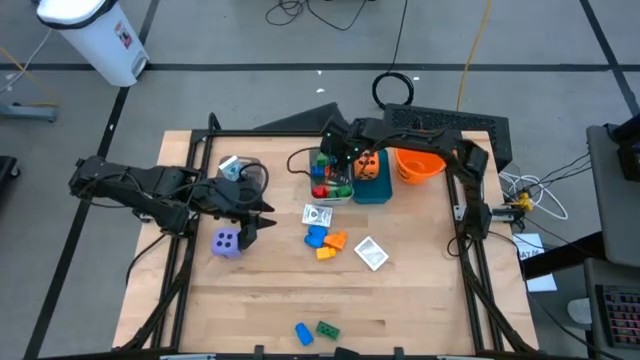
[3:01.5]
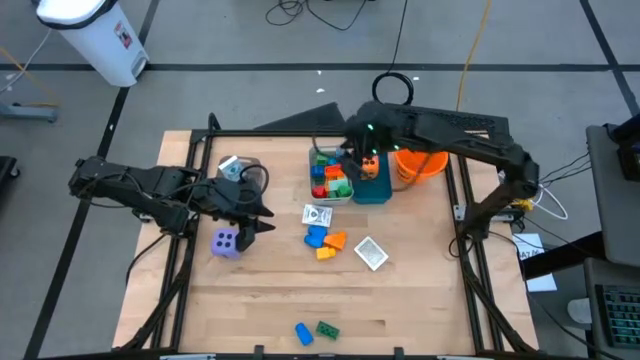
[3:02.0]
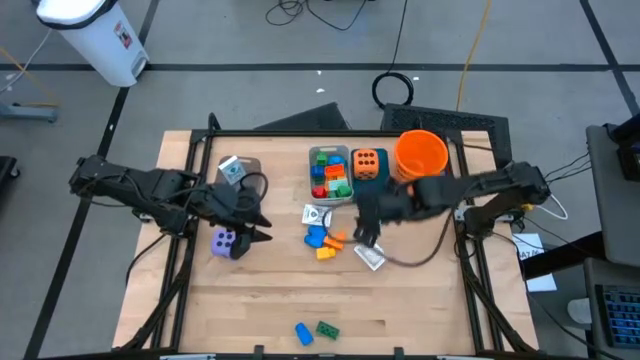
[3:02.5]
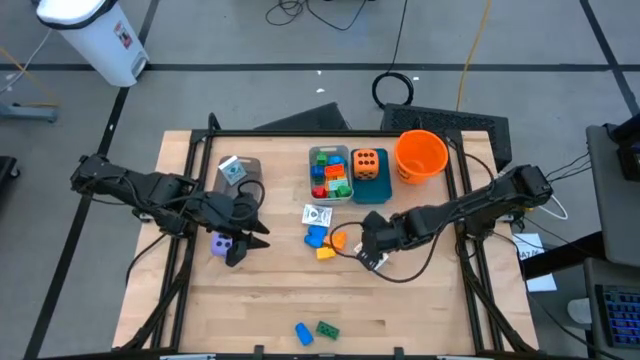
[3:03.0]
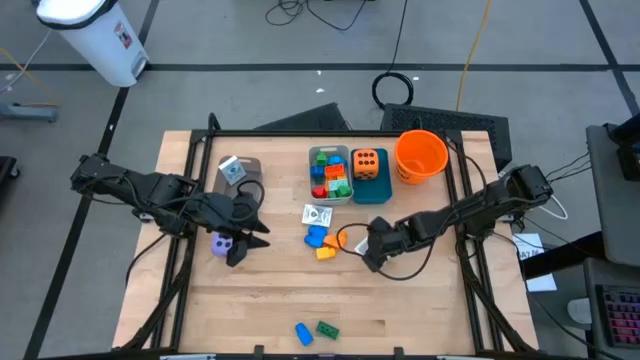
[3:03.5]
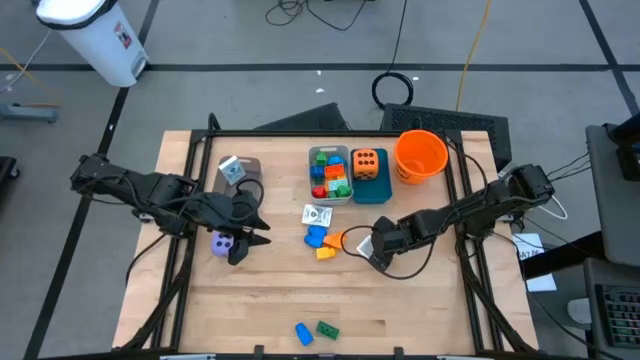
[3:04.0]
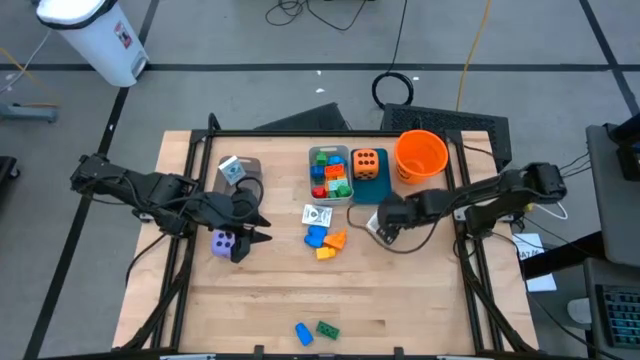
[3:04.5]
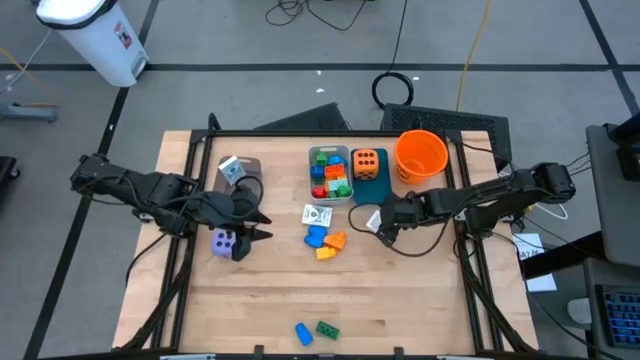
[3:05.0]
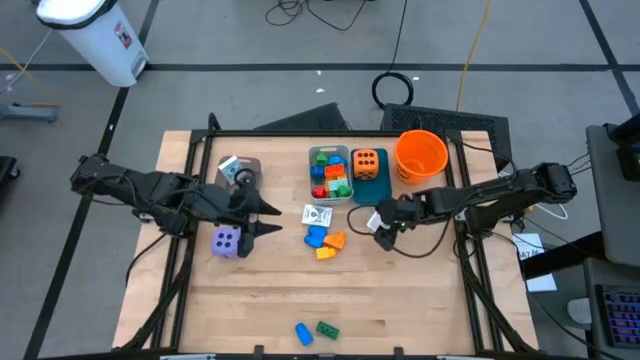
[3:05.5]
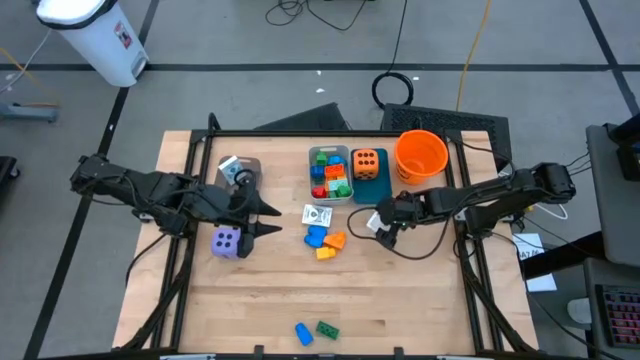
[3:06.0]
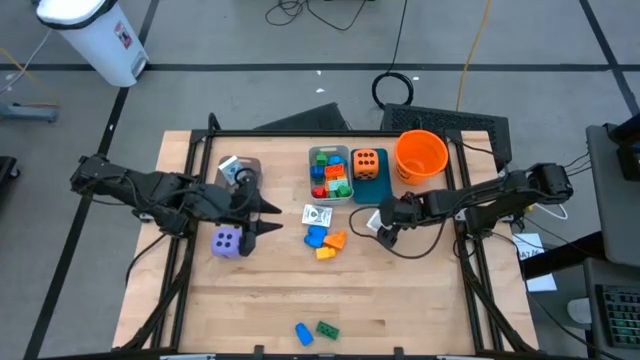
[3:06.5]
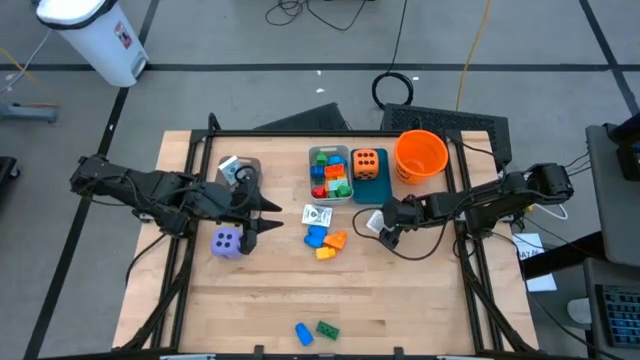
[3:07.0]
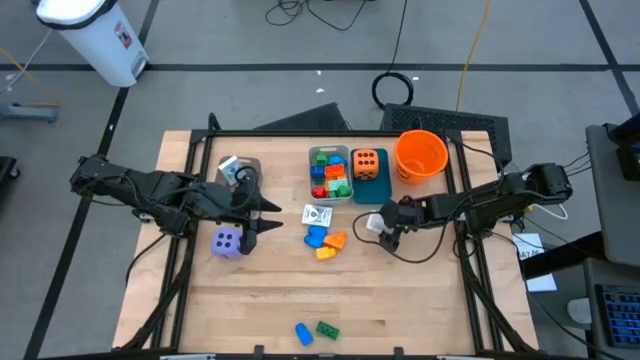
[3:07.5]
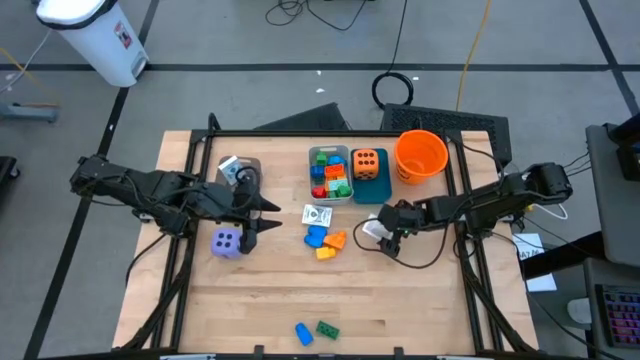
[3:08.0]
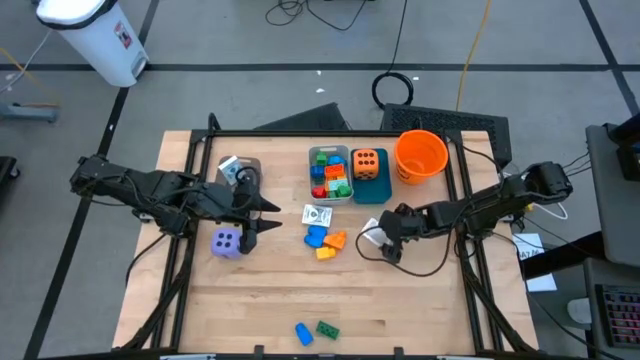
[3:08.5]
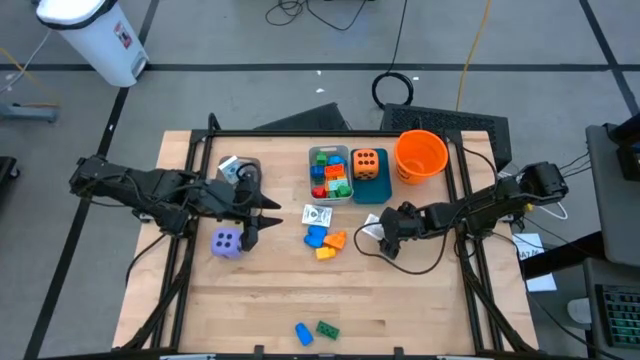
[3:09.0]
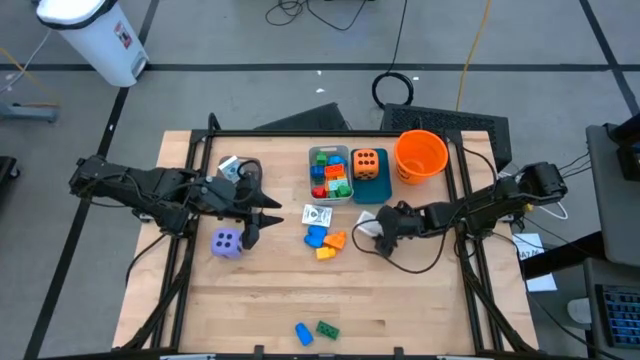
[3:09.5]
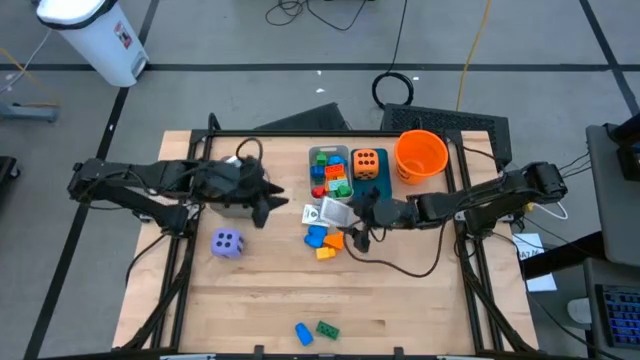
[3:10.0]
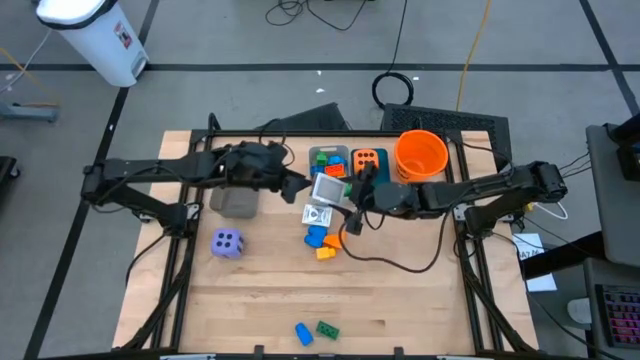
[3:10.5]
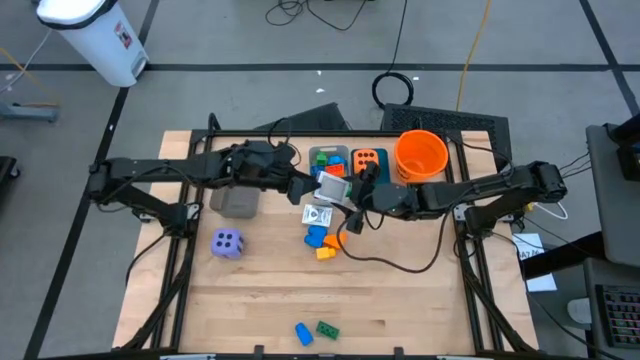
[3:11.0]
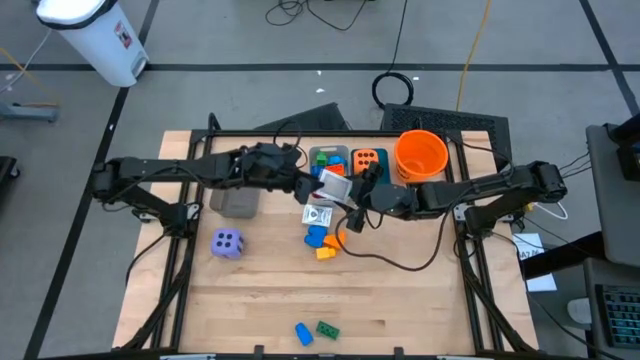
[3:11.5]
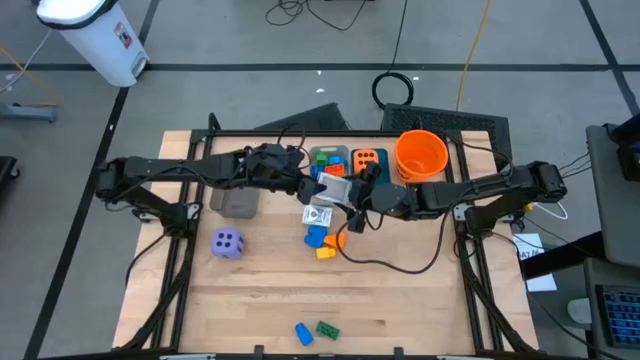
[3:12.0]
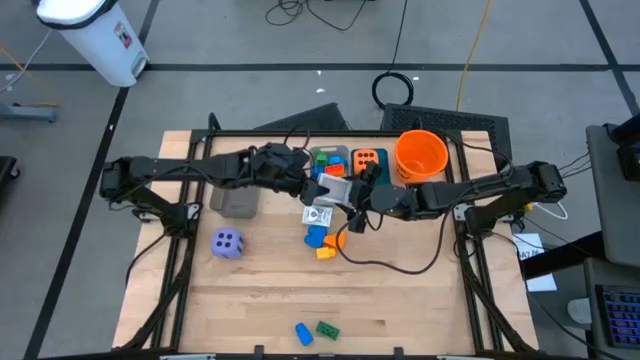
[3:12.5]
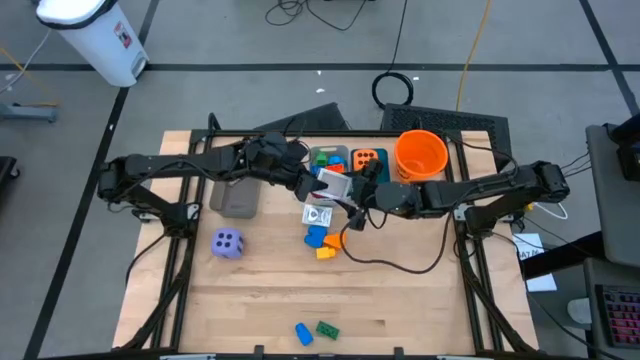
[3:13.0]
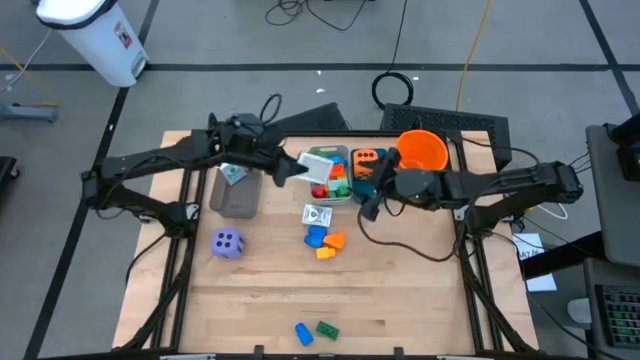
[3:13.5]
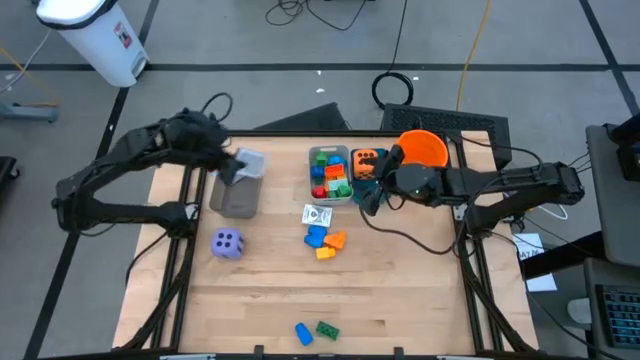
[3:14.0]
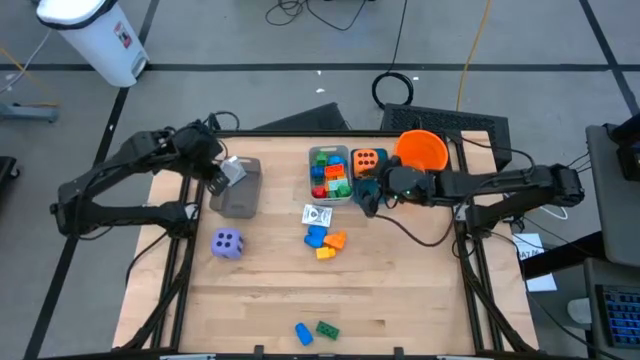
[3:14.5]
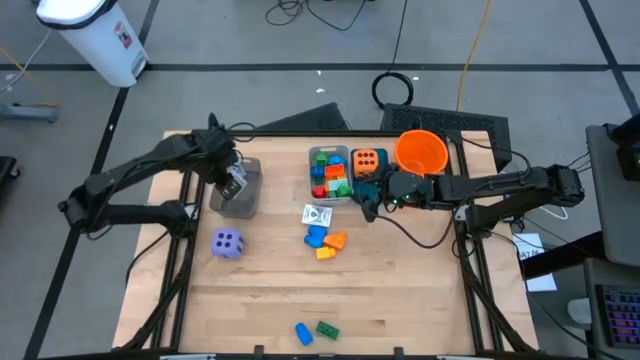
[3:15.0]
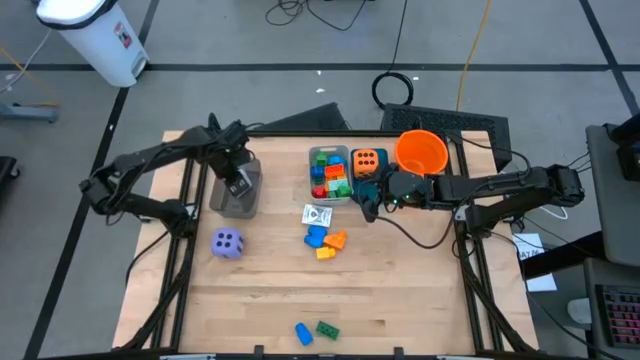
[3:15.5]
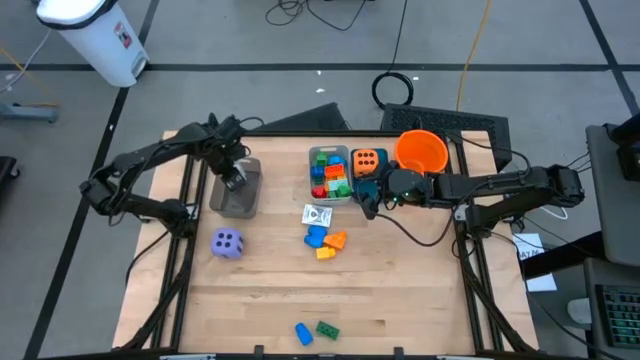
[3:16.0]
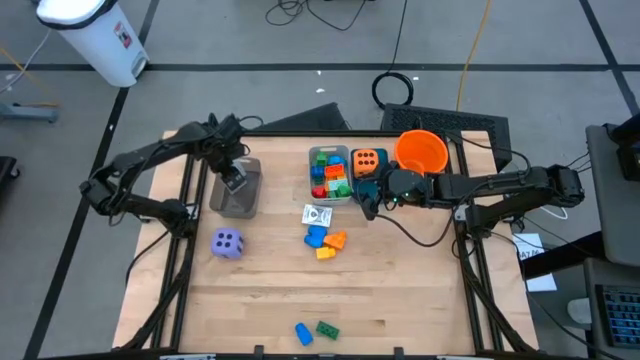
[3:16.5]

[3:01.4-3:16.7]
Task: Pick & Place Toys
Put the brown deck of cards into the black bin

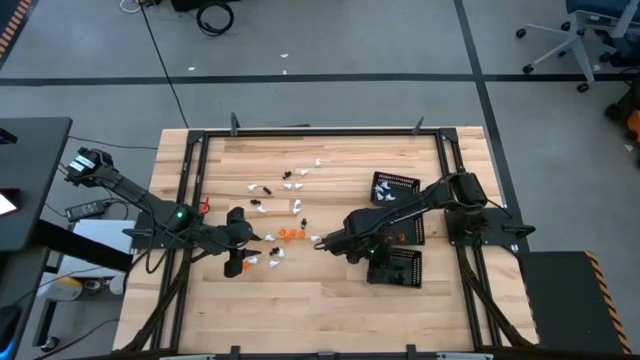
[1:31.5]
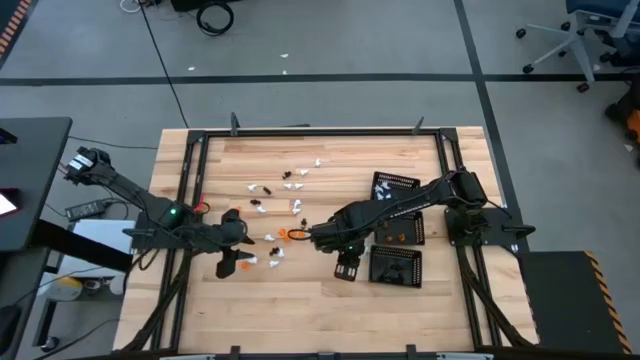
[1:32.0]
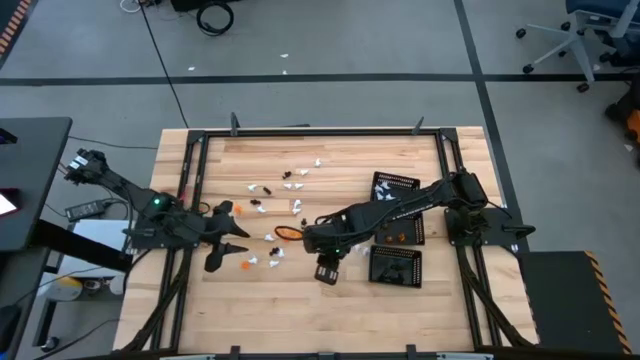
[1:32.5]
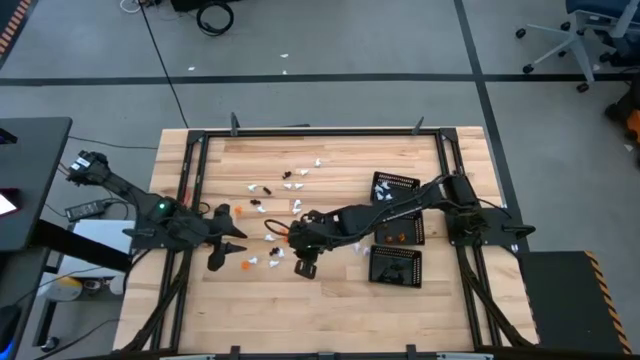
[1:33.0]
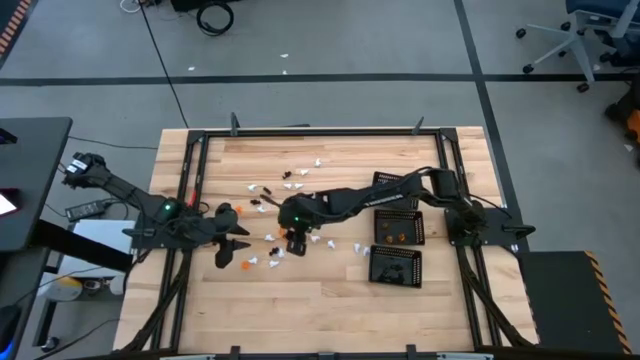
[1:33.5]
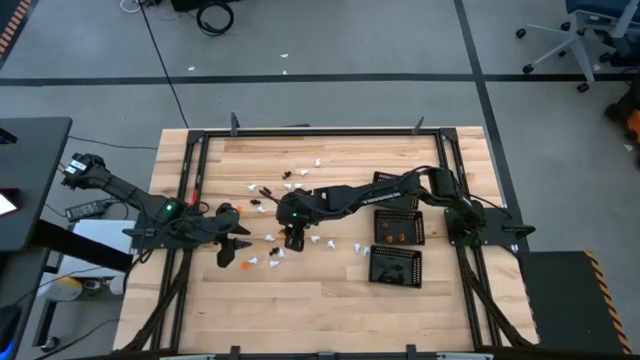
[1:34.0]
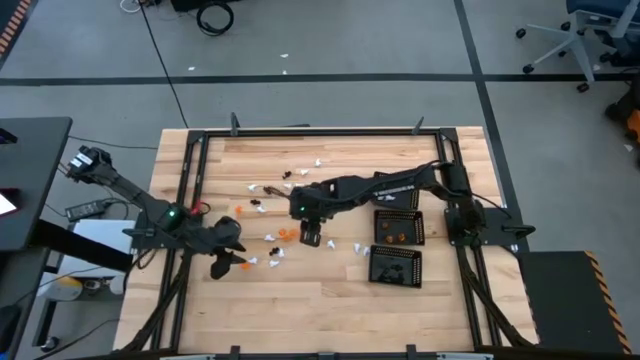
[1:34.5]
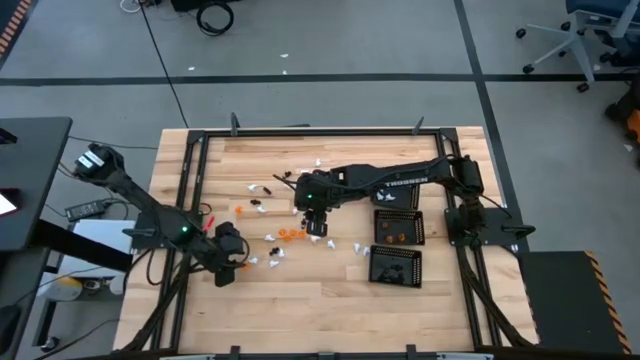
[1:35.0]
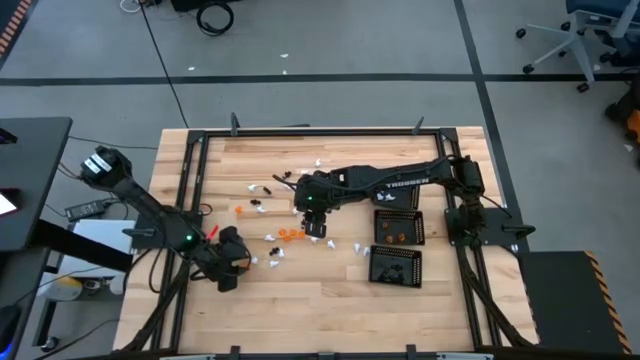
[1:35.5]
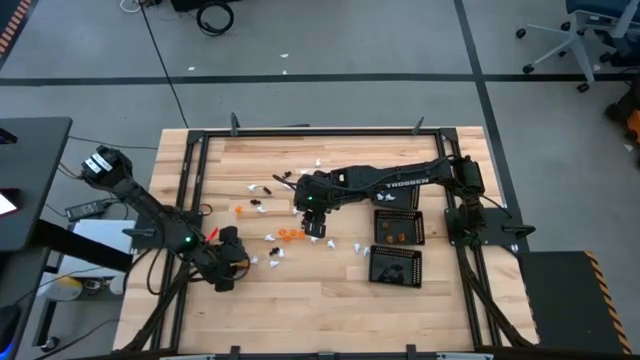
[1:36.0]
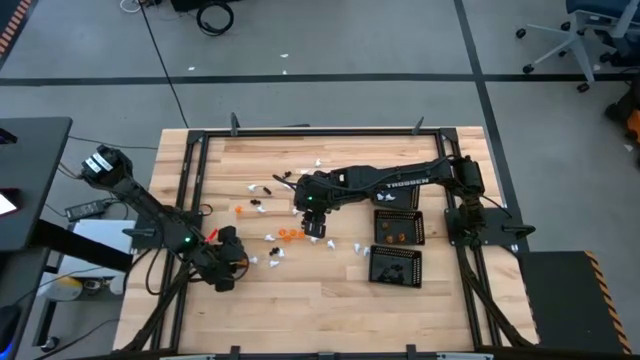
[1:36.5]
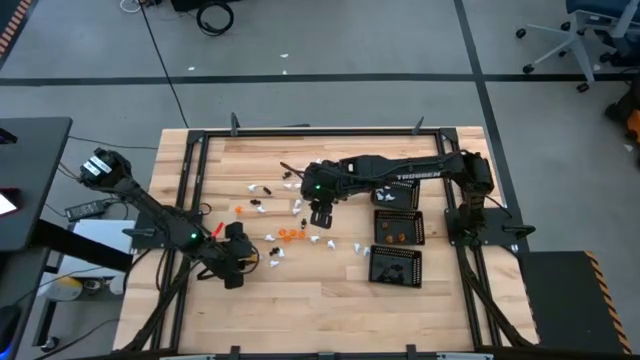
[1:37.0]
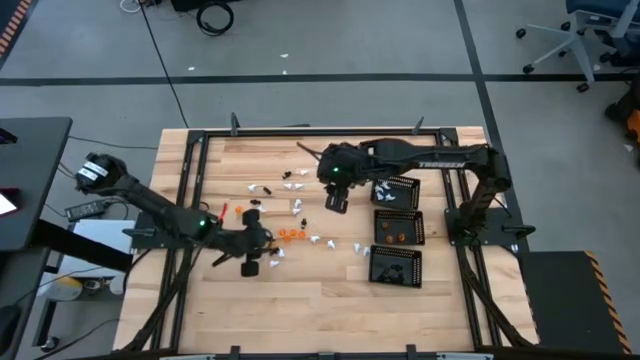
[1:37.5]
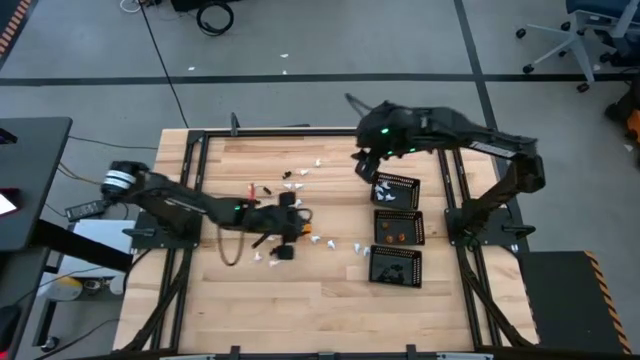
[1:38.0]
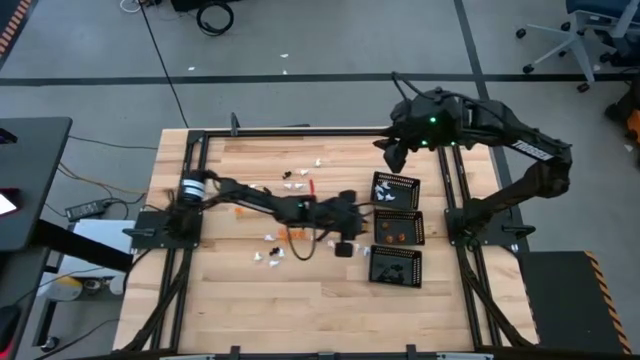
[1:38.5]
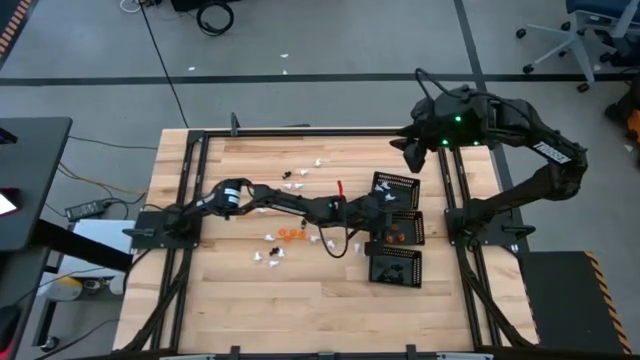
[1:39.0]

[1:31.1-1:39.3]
Task: Sort Halloween decoration
Put the orange pumpkin toy into the center black bin
